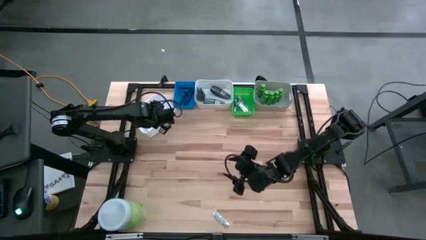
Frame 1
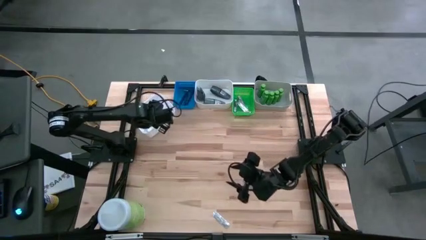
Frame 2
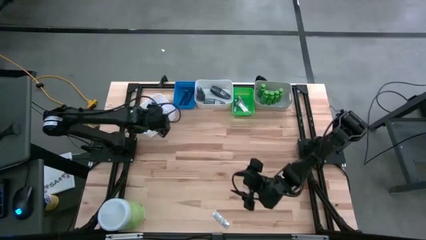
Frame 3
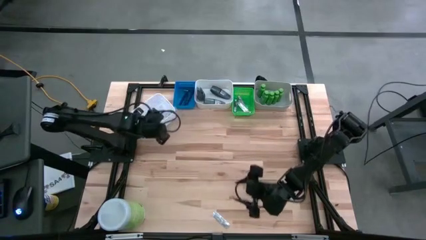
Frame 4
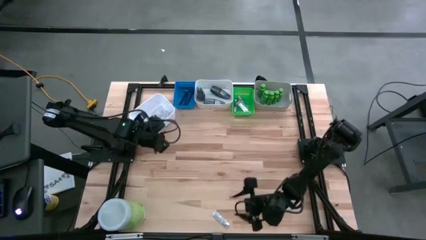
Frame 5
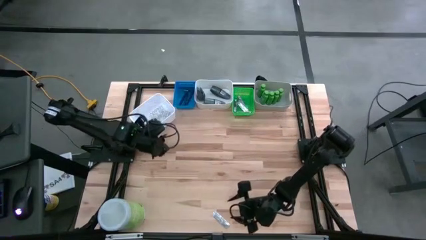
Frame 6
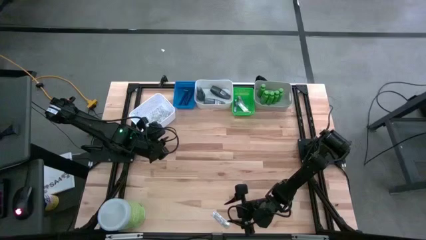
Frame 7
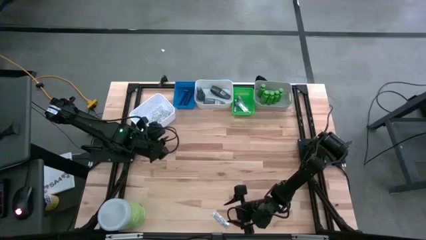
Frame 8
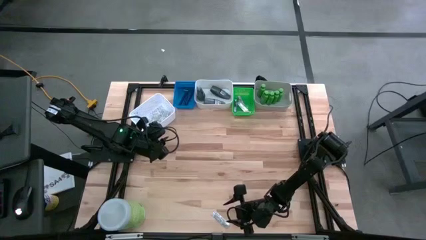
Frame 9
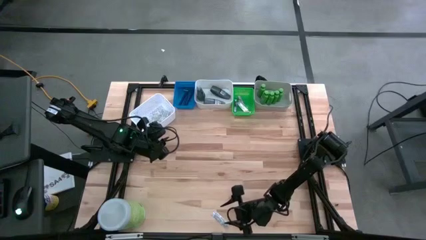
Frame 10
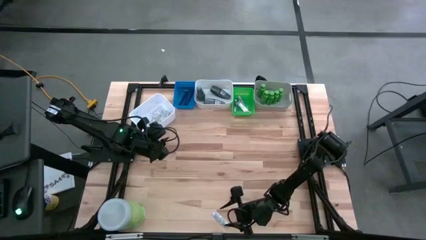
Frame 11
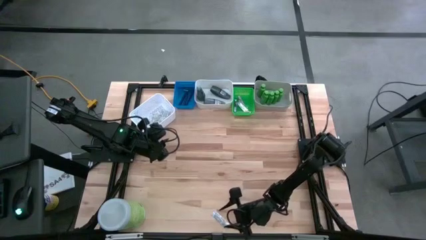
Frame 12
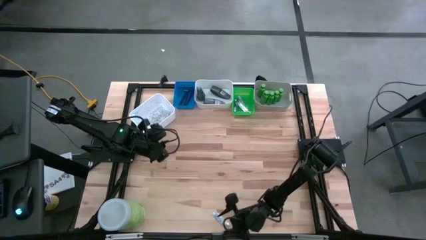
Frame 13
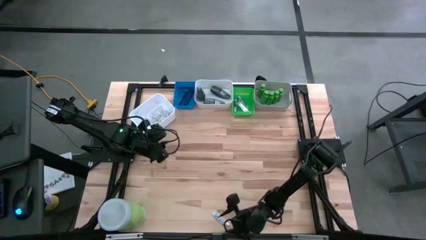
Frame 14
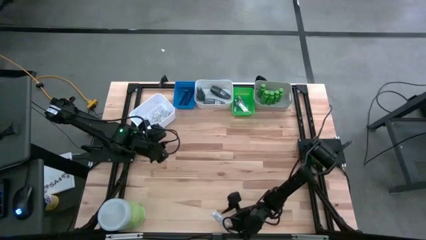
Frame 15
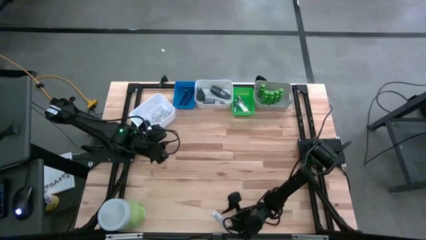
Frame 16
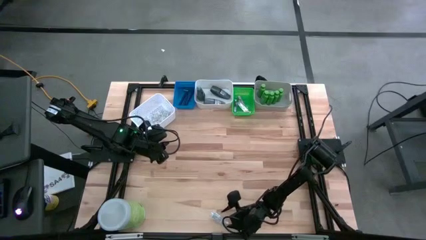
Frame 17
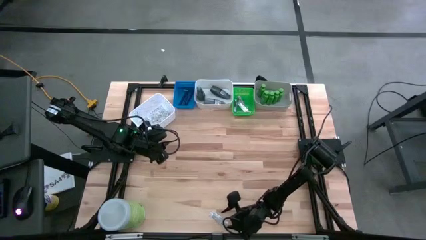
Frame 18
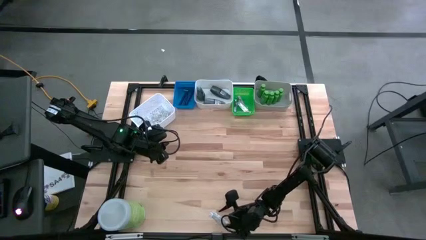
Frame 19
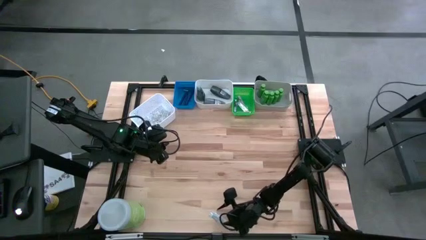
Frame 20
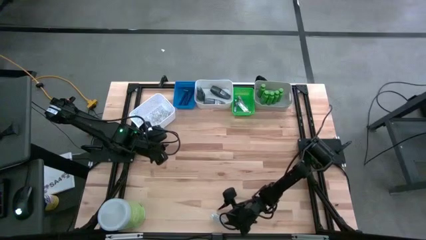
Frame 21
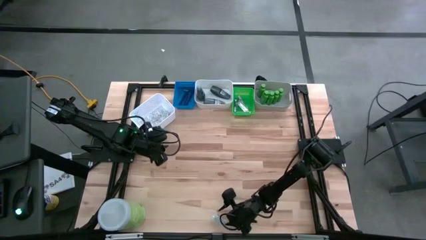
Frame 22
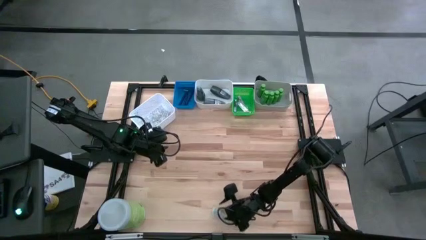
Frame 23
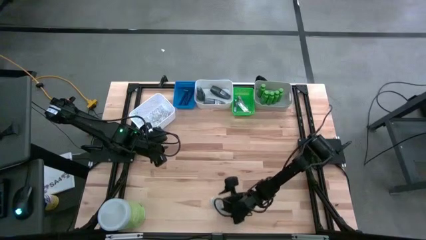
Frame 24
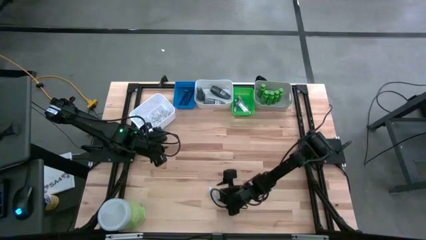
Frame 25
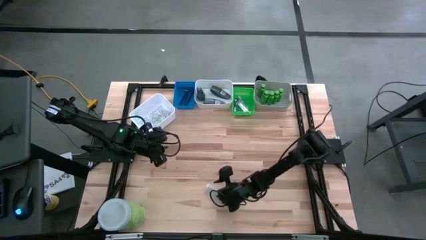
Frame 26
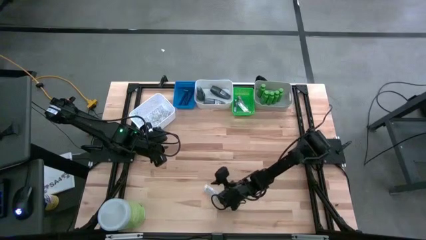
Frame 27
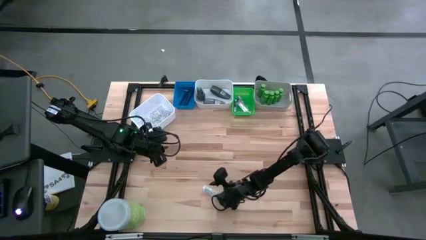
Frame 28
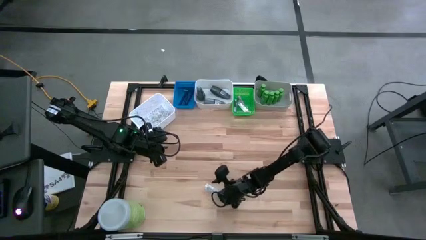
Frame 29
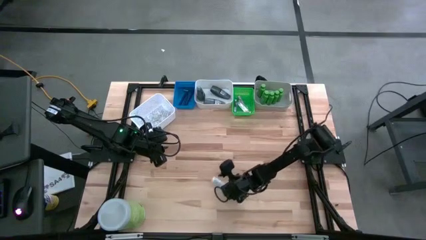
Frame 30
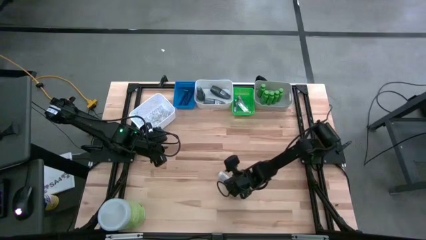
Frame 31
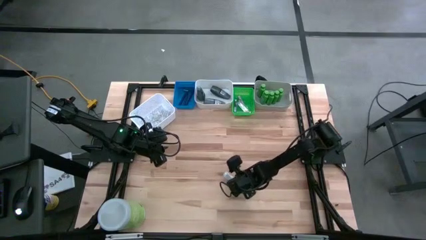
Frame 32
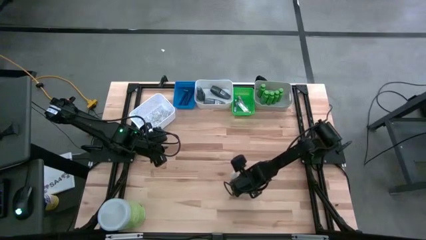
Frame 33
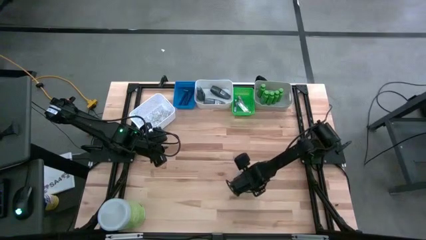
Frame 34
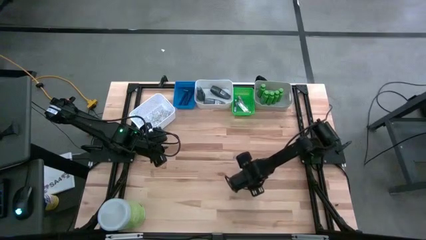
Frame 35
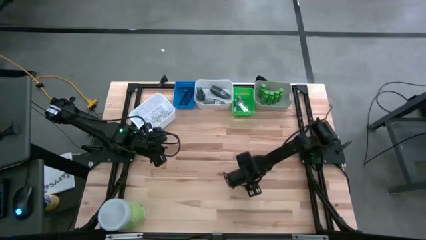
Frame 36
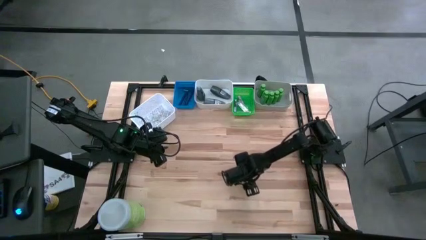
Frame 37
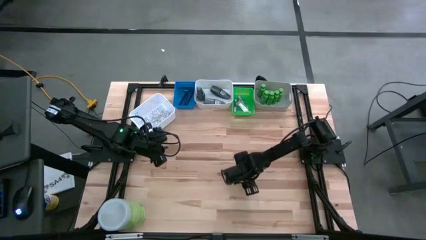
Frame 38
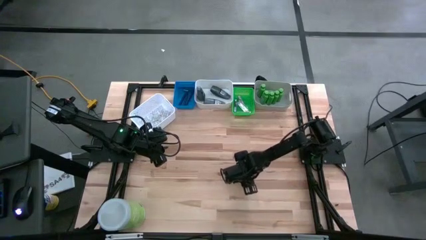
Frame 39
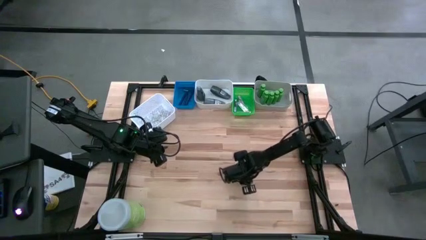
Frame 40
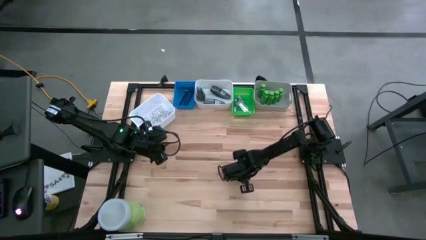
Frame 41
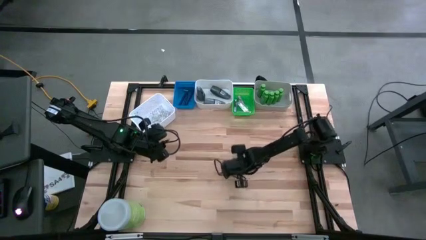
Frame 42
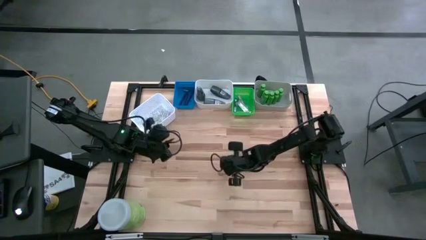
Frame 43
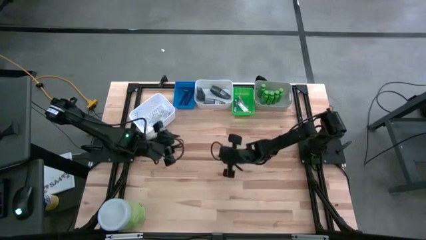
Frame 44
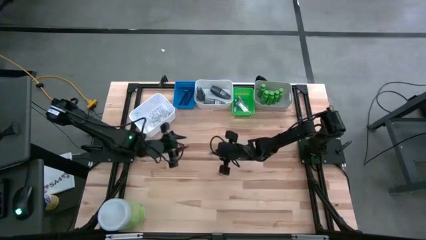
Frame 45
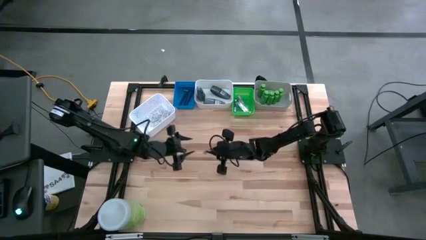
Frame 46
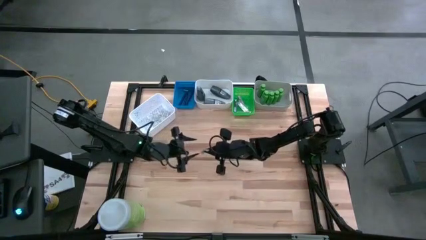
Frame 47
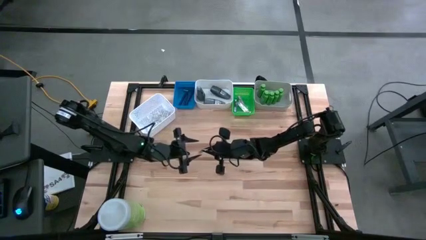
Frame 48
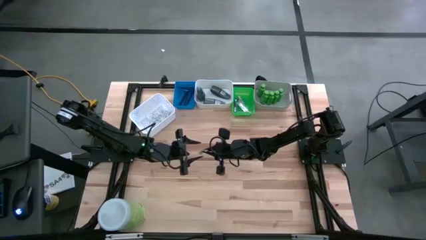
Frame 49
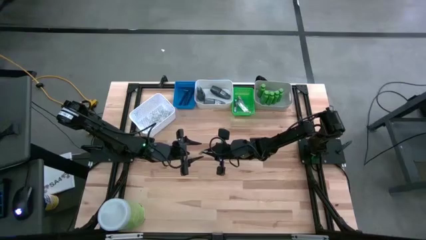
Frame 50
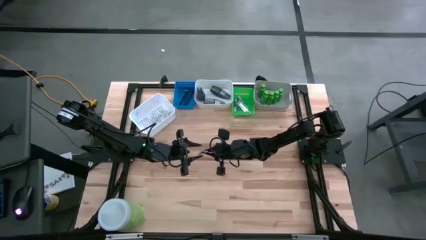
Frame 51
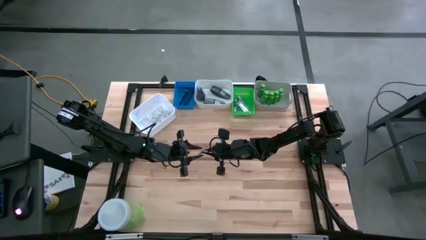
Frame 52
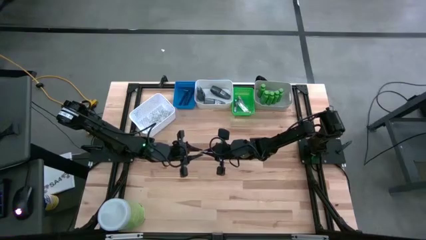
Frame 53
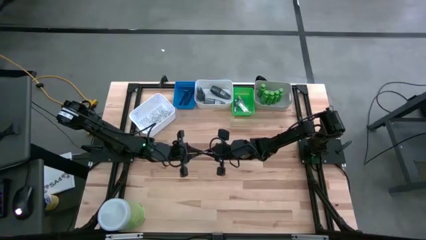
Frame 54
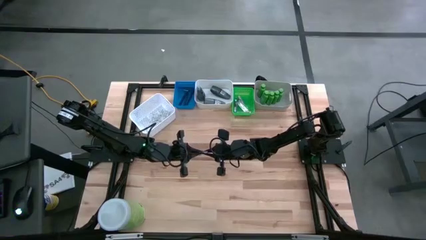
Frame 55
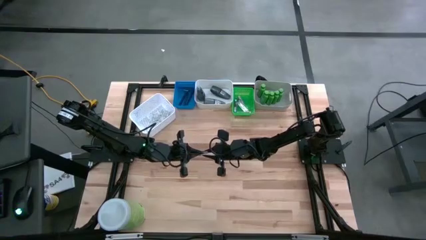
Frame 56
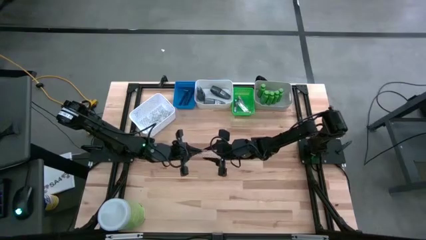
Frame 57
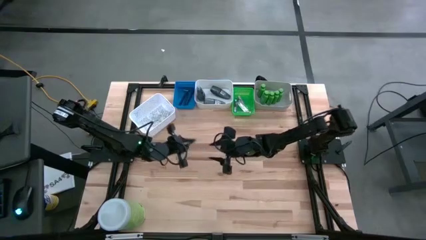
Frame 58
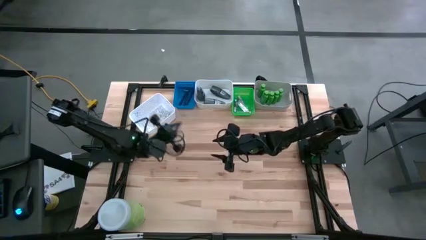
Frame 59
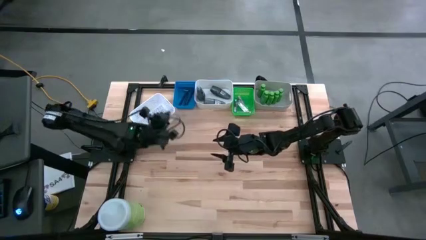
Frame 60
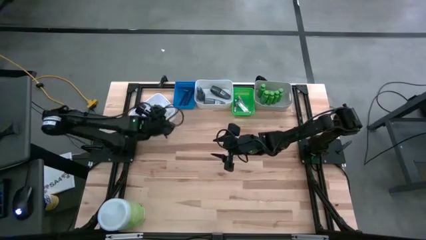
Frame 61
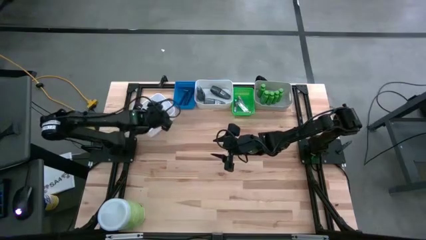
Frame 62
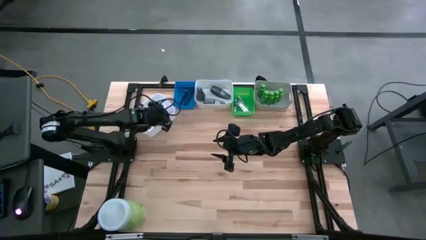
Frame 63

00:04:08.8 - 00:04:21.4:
Task: Pick & Place Travel size toiletries
Put the bandage pack into the left white bin

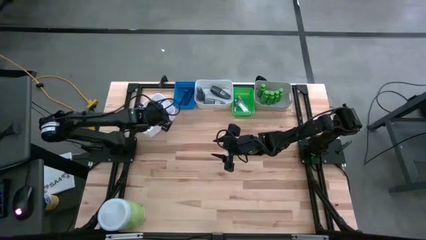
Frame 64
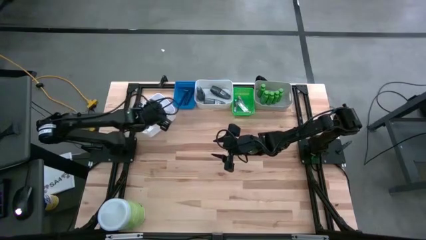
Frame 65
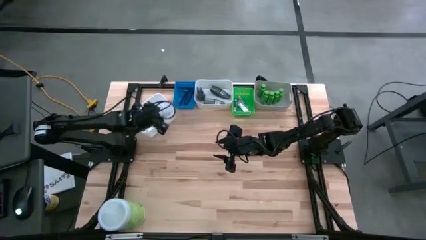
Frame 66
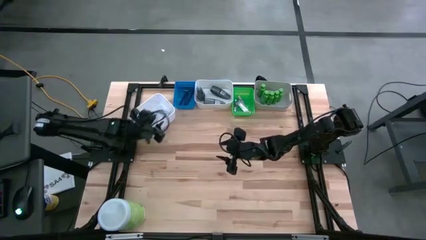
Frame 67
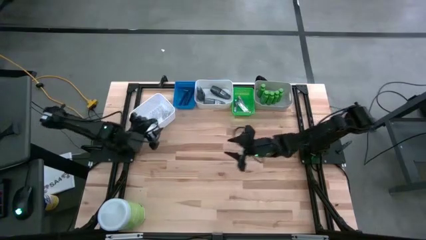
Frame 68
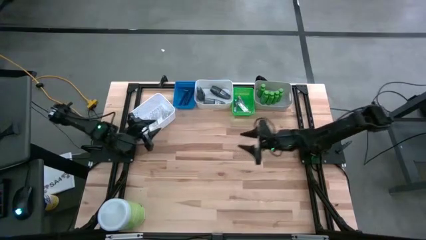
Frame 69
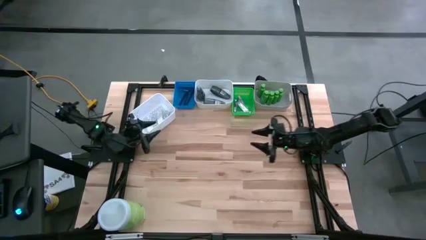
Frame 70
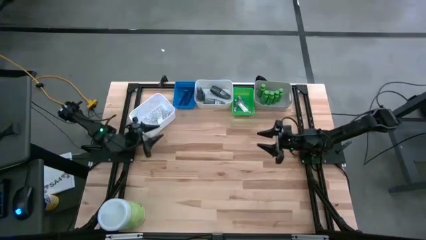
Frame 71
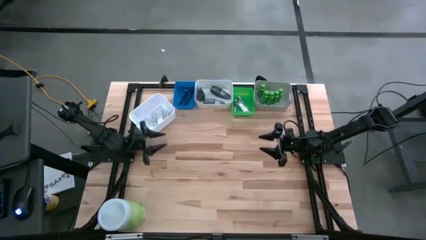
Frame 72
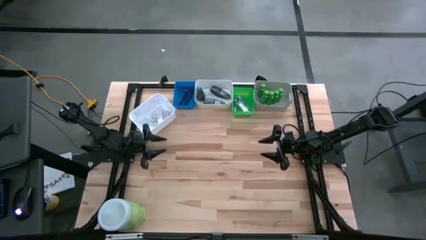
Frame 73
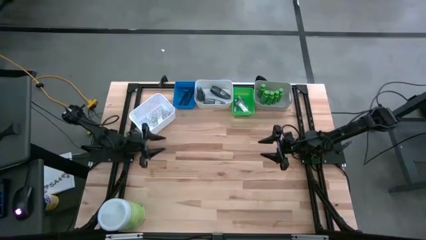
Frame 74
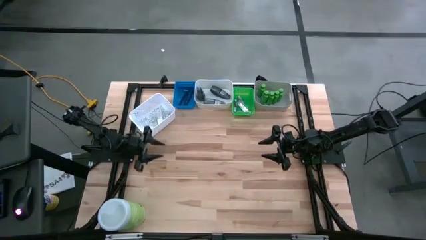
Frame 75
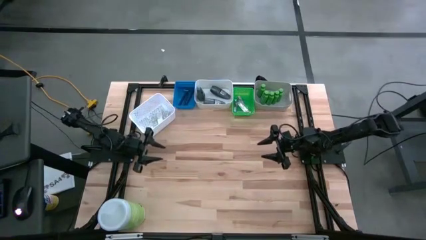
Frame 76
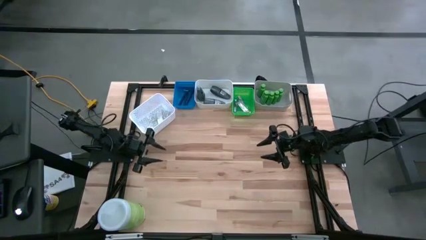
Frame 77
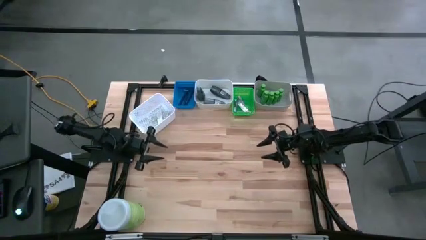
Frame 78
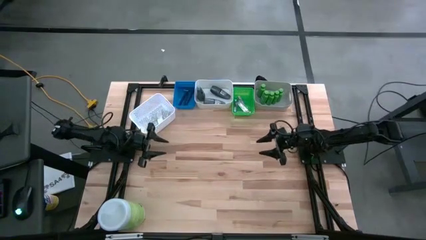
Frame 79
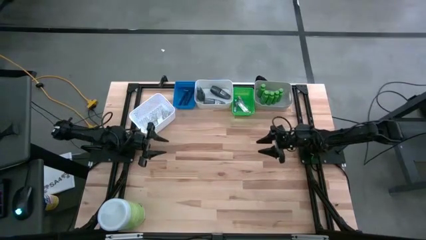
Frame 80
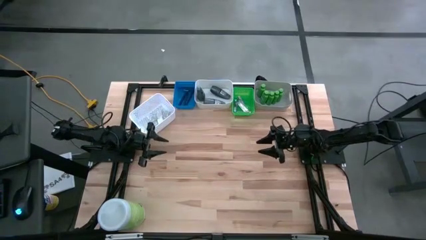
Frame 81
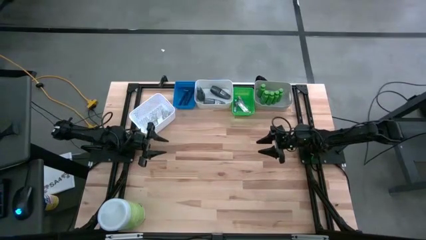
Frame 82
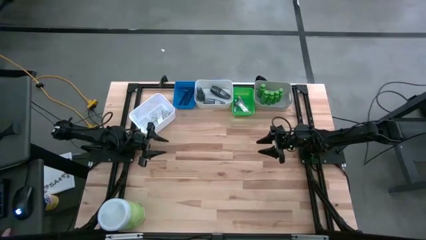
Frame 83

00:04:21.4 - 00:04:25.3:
Return to home position
